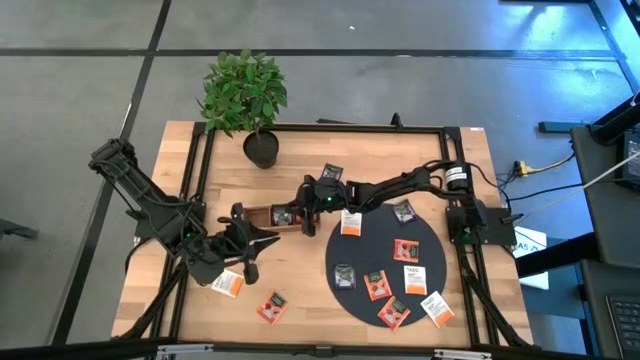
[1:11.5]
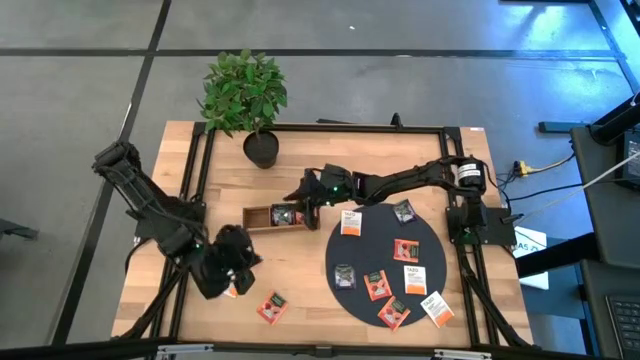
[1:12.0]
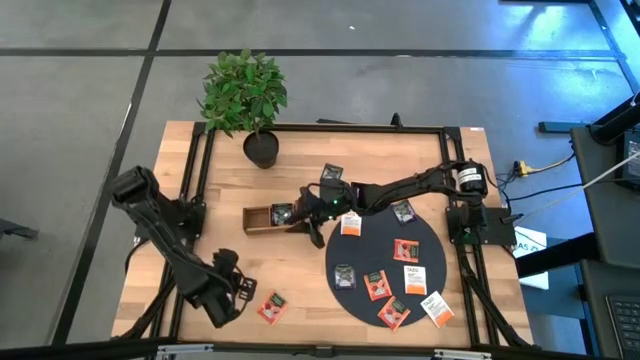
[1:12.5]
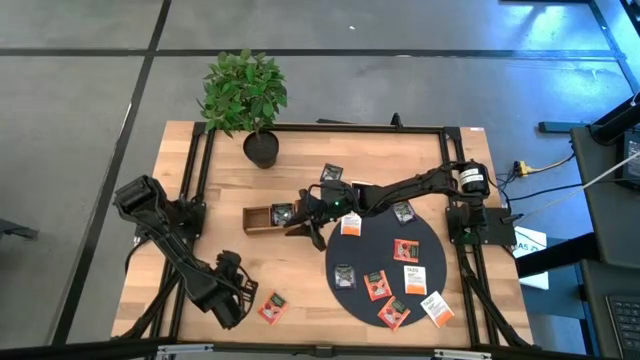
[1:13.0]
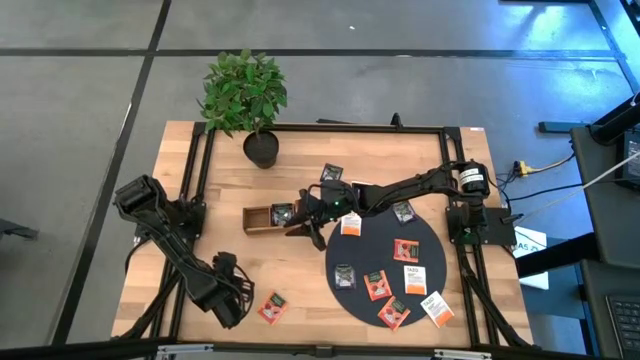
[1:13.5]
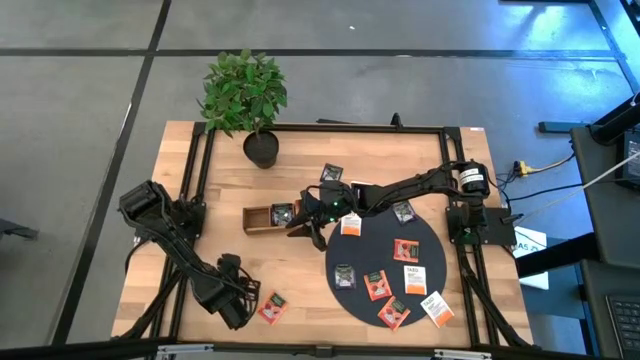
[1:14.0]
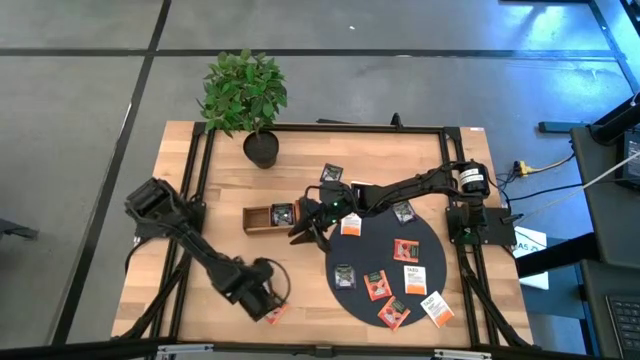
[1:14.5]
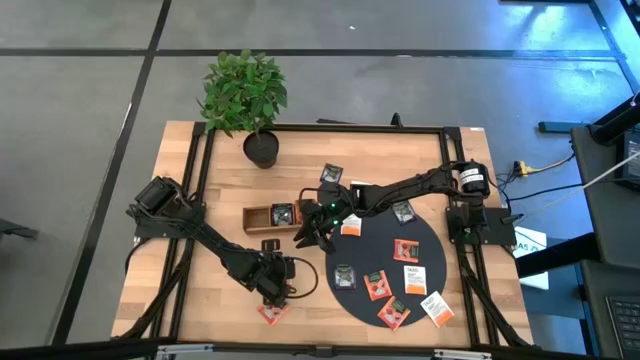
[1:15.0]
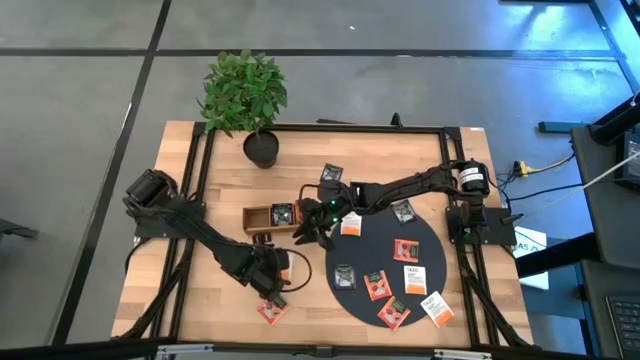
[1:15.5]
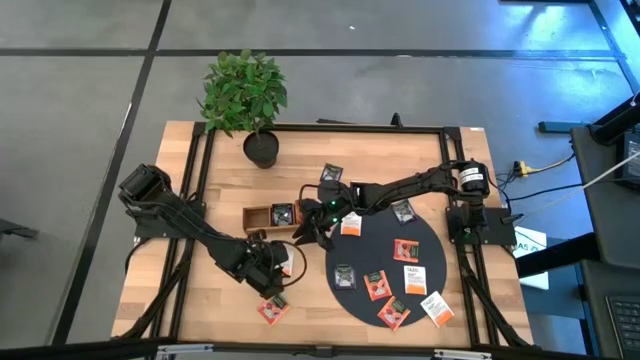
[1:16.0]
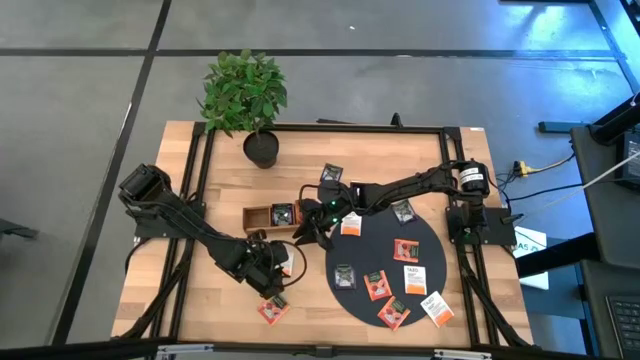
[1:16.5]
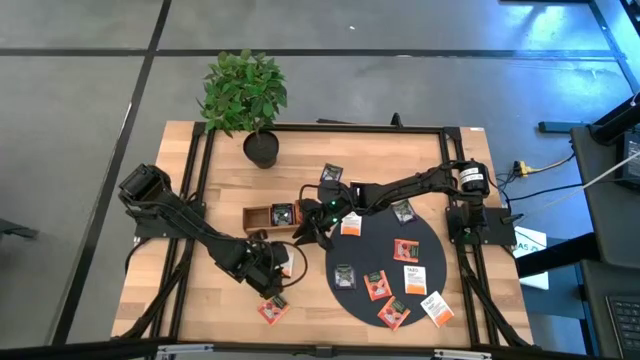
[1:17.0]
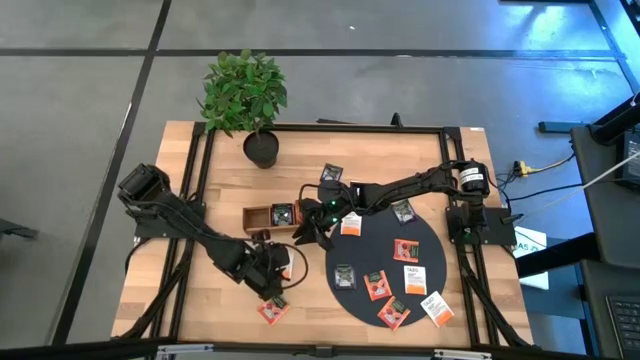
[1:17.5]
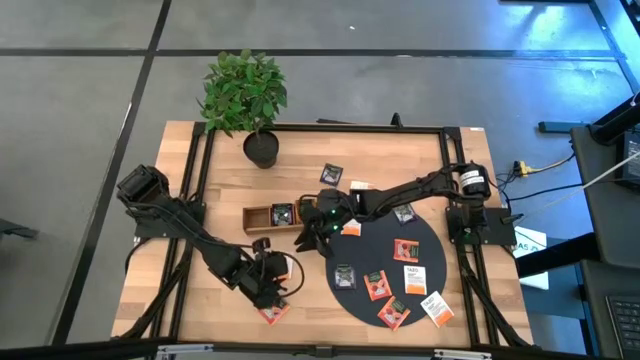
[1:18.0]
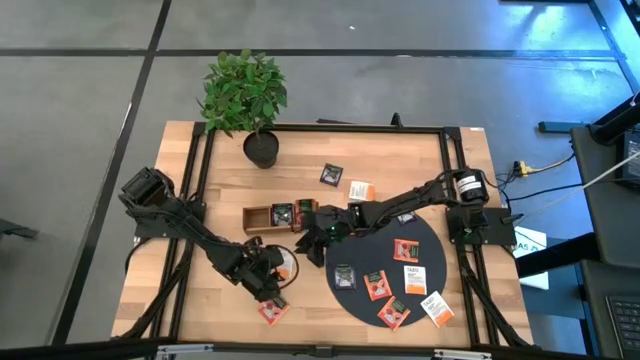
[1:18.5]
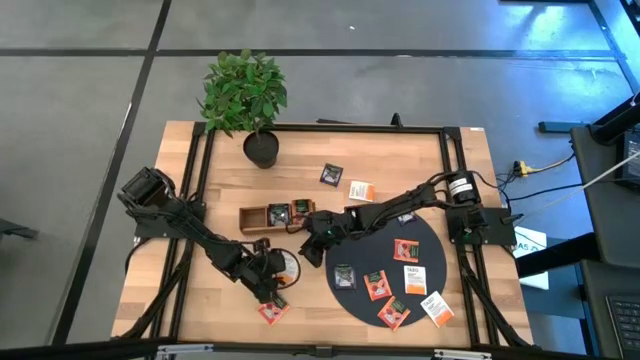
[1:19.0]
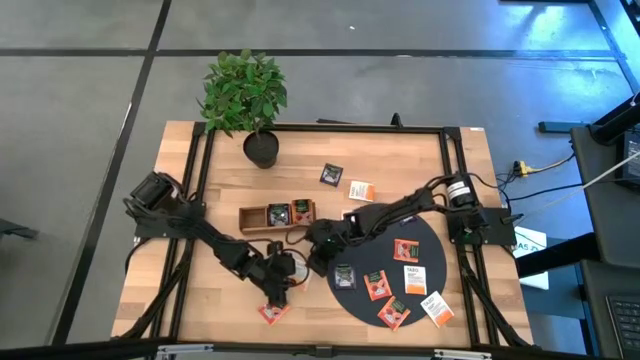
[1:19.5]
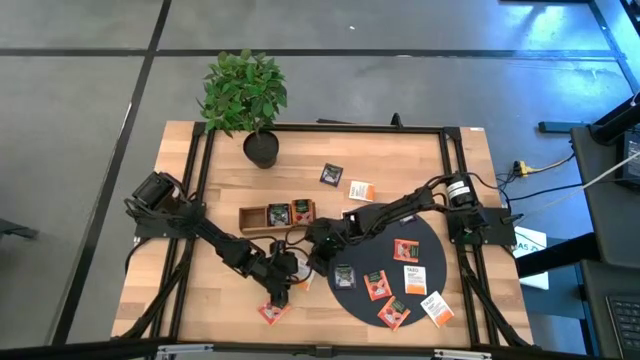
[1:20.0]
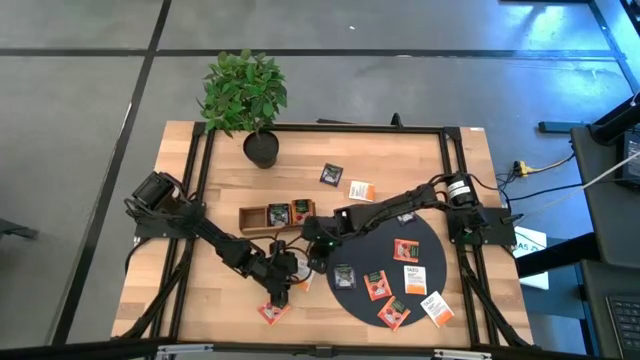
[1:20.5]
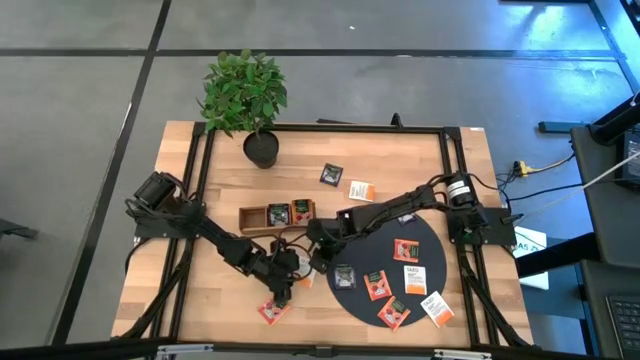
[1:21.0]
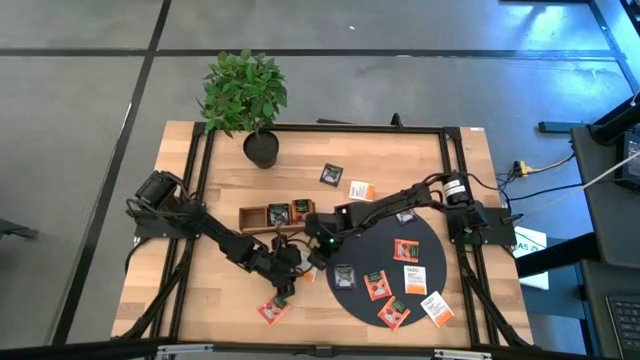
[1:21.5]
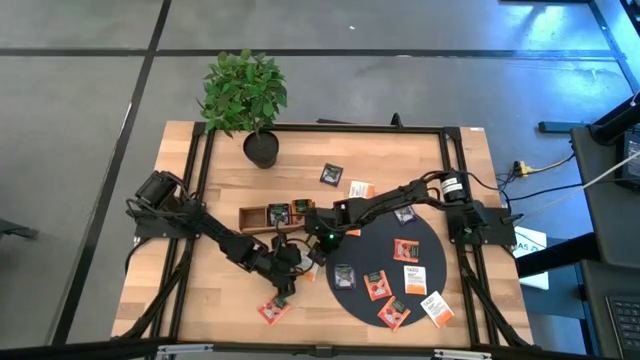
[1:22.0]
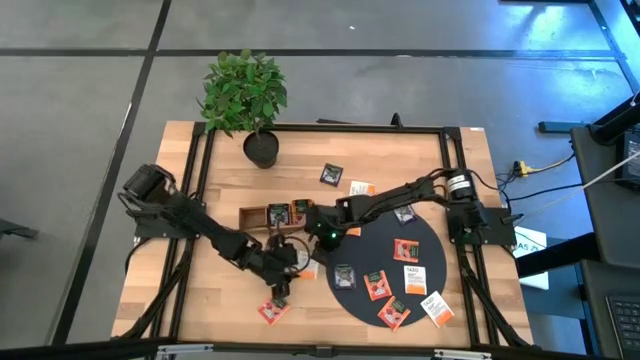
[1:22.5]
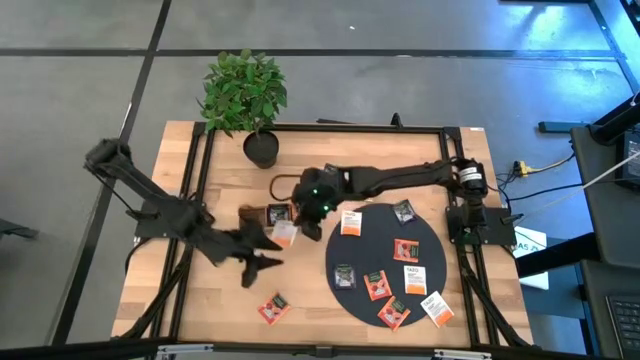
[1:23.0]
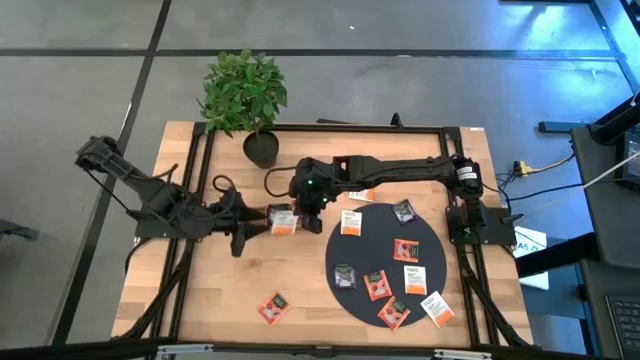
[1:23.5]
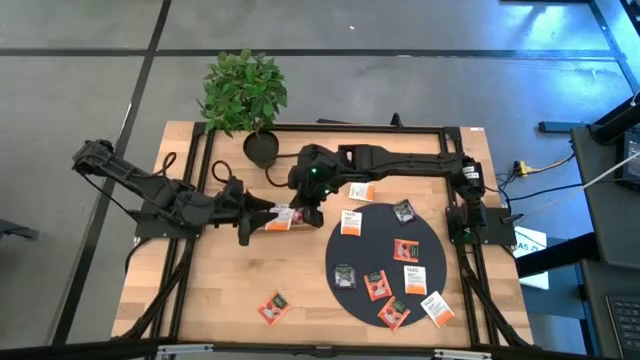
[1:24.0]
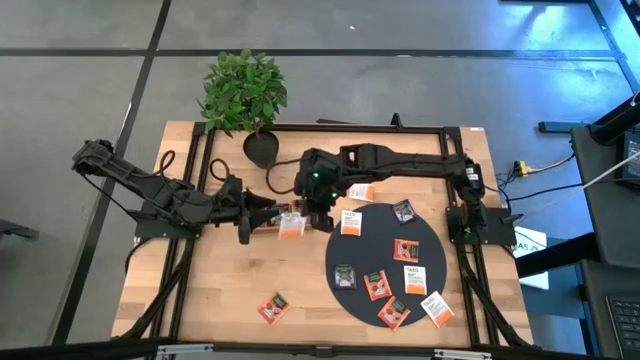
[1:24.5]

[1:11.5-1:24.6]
Task: Pick & Place Tea
Put the white tea bag into the left section of the wooden organizer

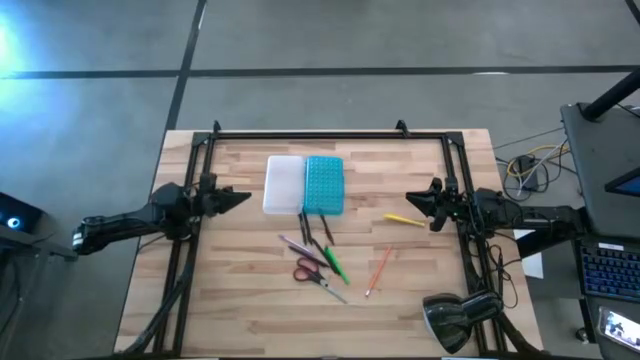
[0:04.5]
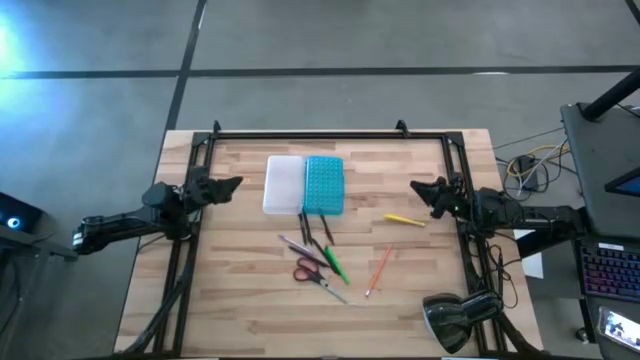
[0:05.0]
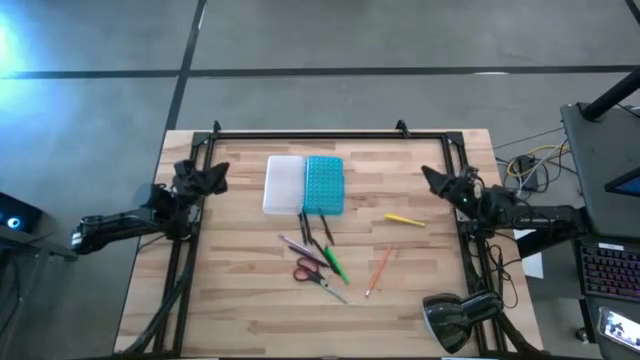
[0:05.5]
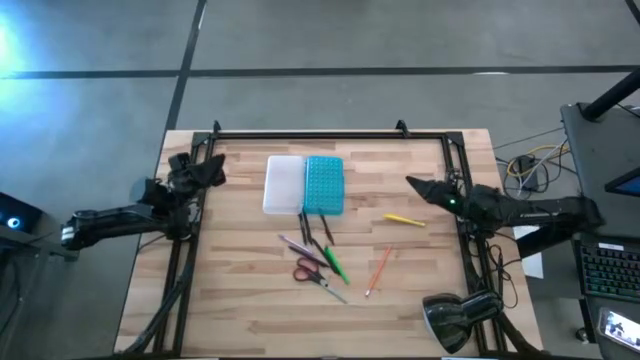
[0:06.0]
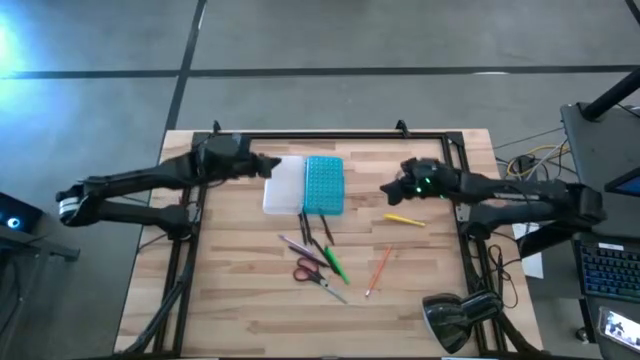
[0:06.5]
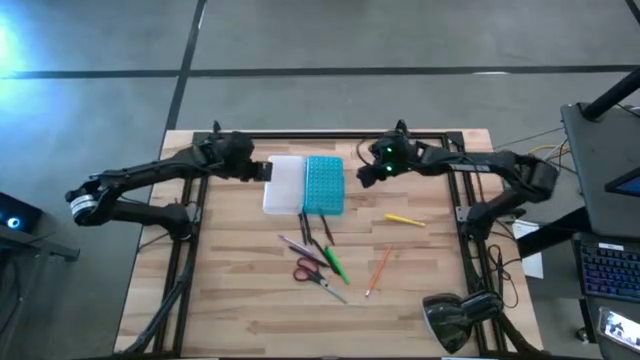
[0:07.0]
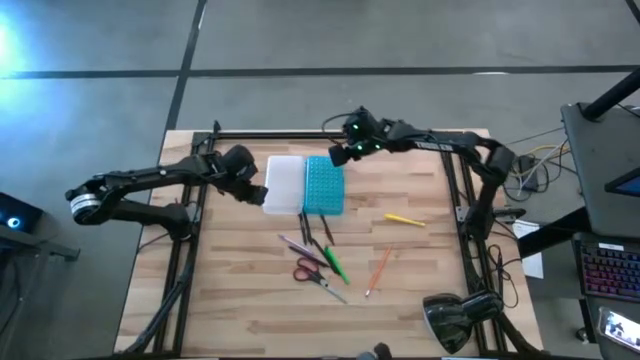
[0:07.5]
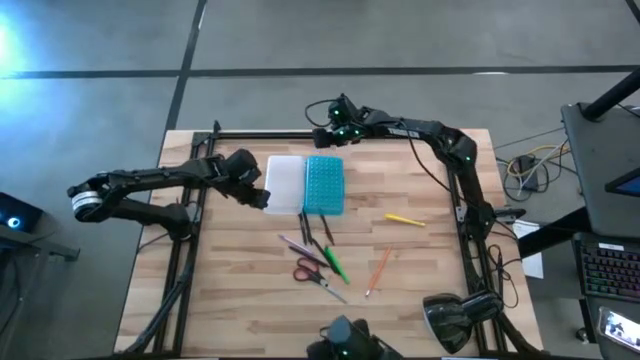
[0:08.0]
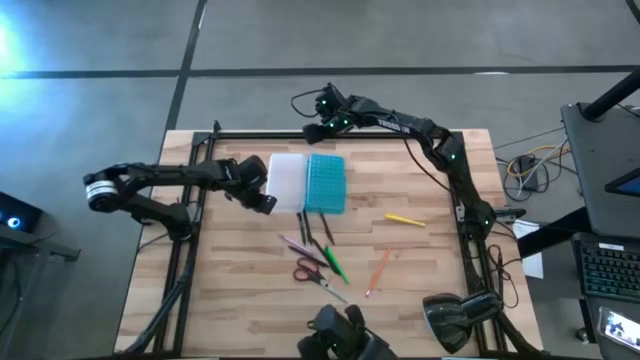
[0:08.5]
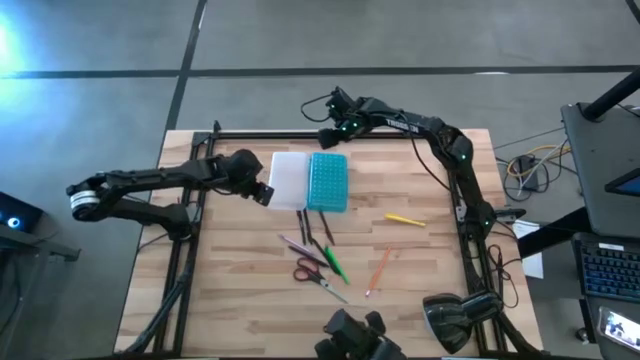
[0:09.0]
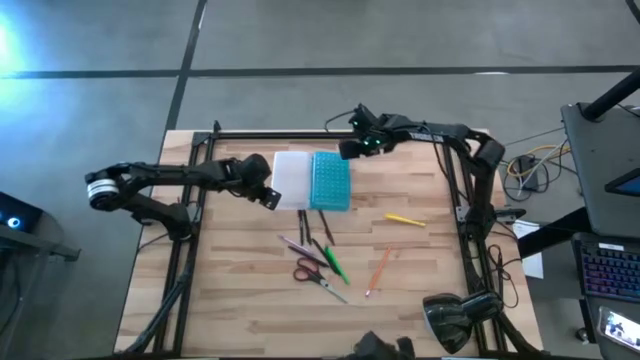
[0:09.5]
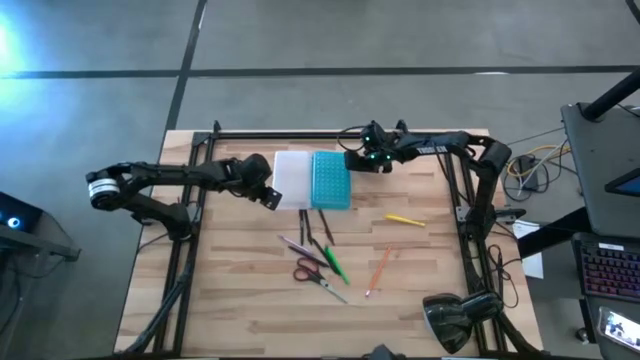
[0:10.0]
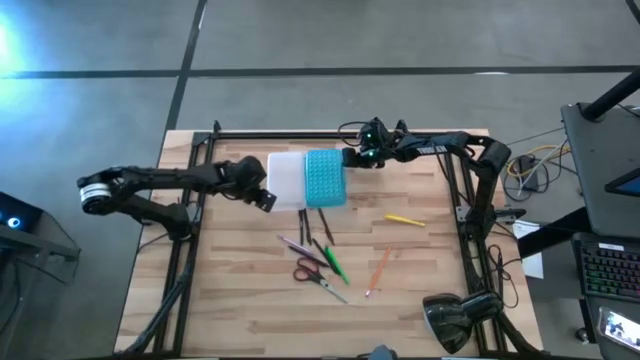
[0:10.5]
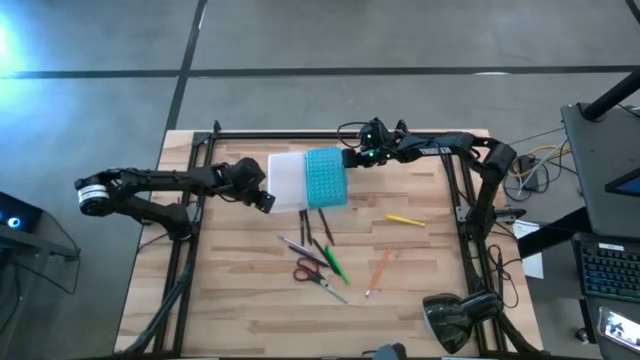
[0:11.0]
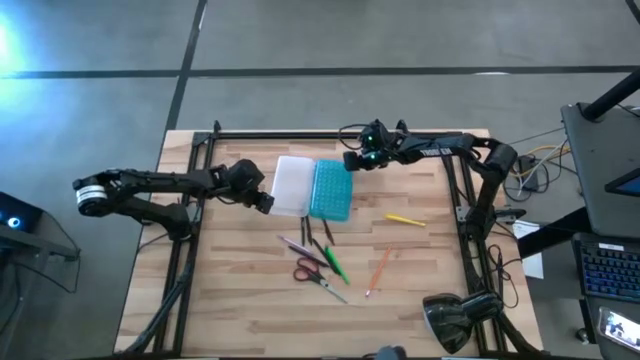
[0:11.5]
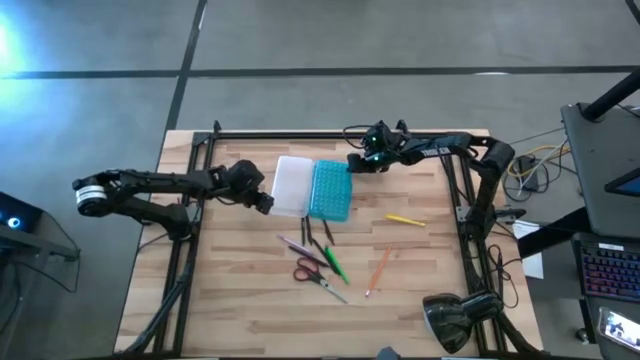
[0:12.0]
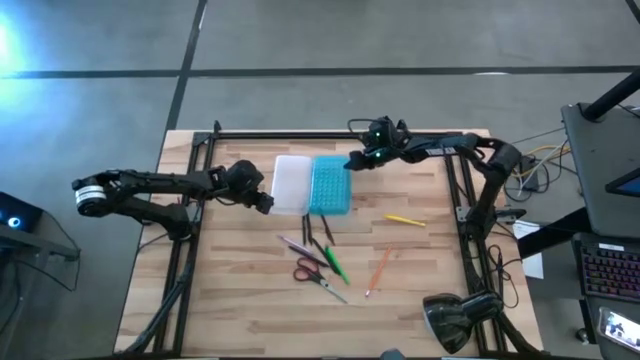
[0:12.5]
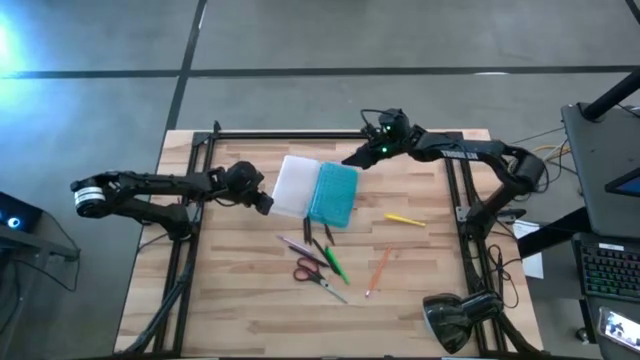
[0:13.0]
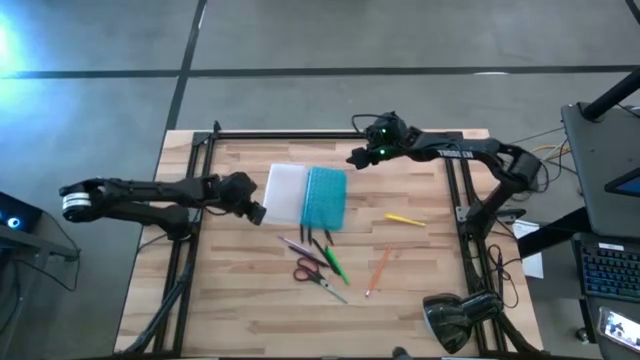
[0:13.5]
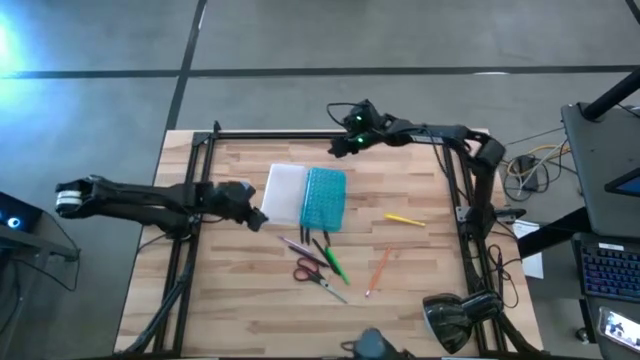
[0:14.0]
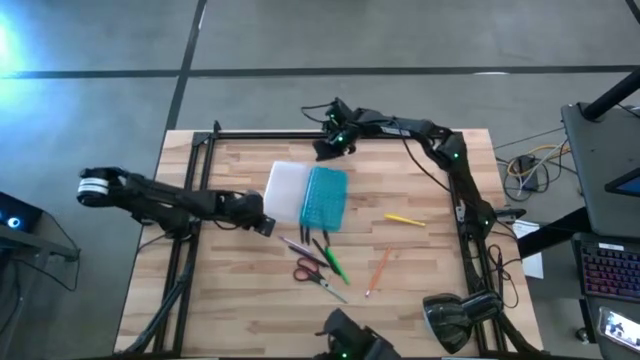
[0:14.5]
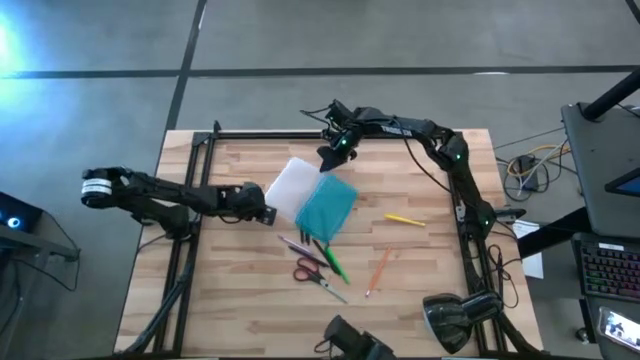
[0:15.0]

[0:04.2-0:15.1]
Task: Pick & place school supplies into a supply box
Prepare the blue supply box
